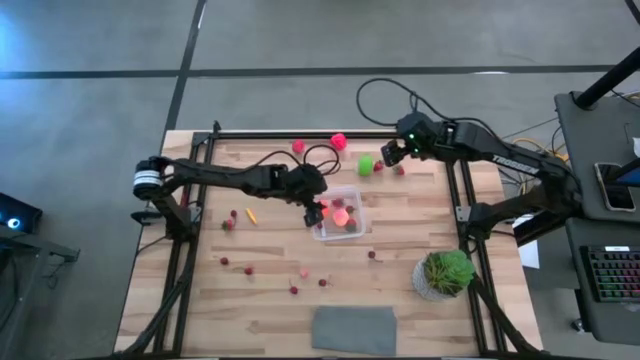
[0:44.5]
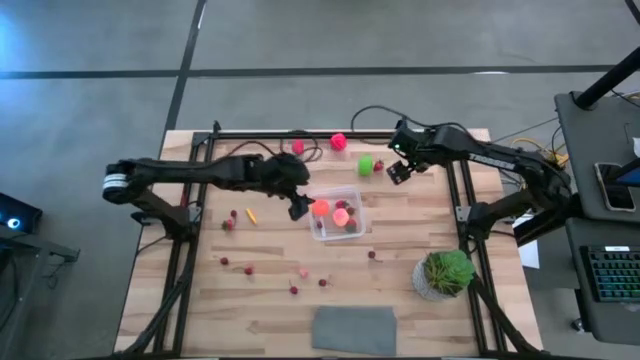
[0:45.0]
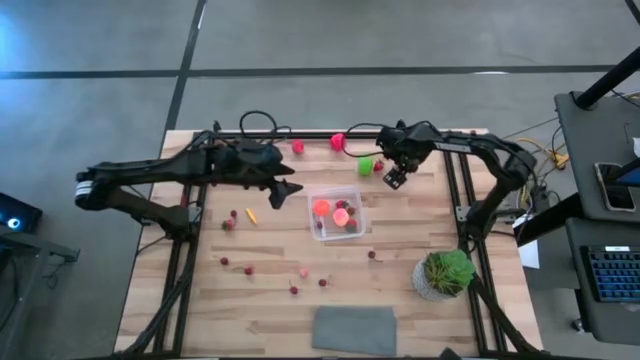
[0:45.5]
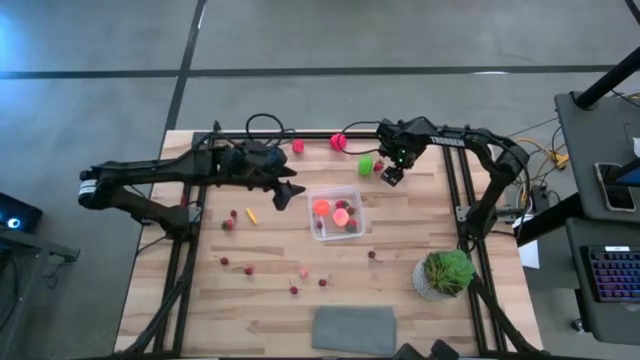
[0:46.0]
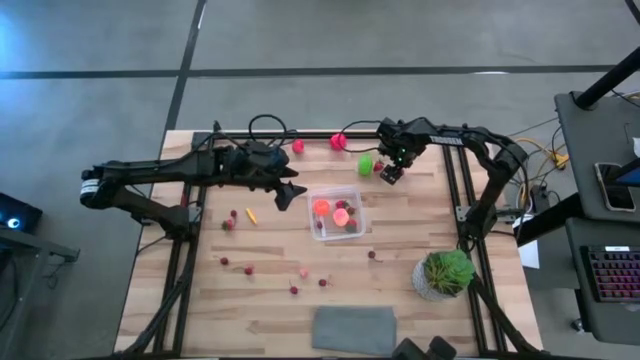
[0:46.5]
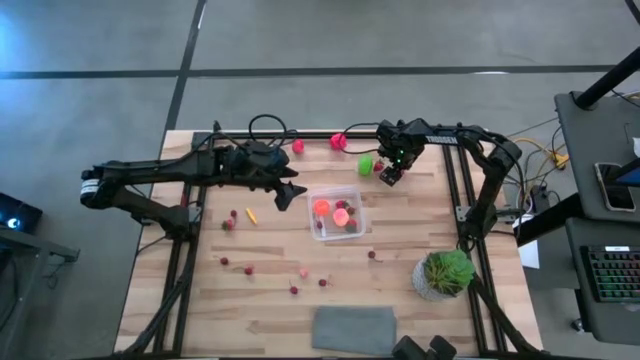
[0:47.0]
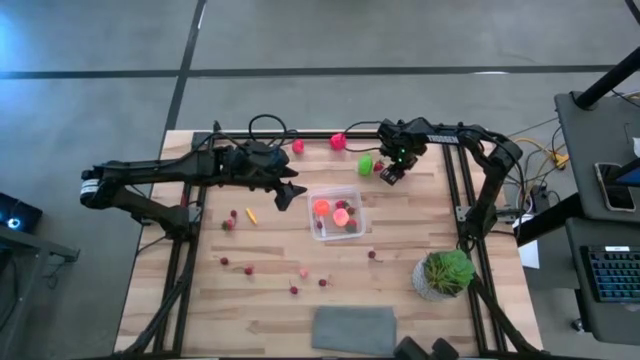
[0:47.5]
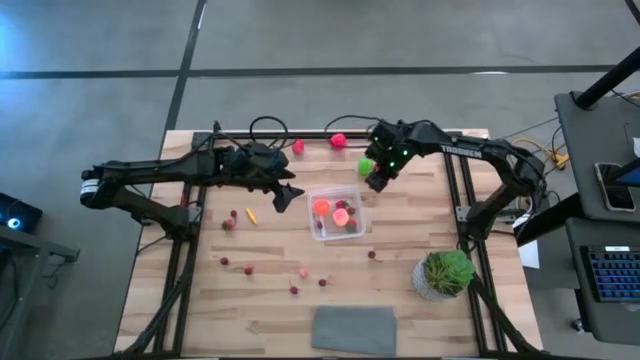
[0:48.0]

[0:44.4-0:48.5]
Task: Pick and placing Produce into tupperware
Put the red strawberry into the transparent container

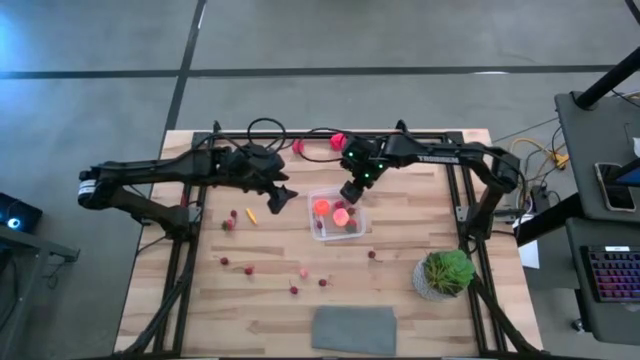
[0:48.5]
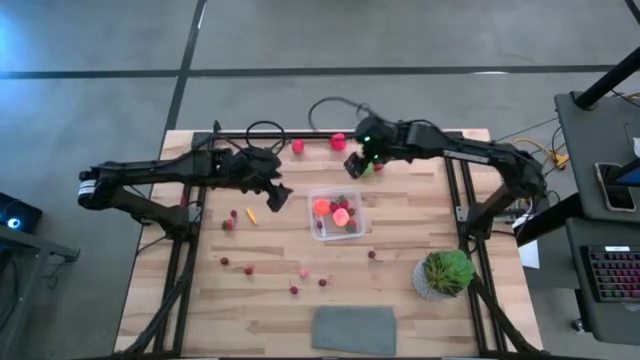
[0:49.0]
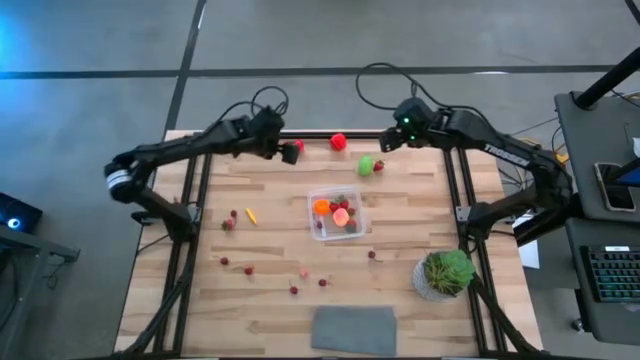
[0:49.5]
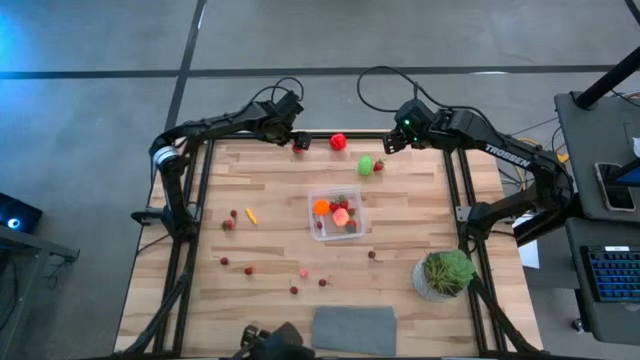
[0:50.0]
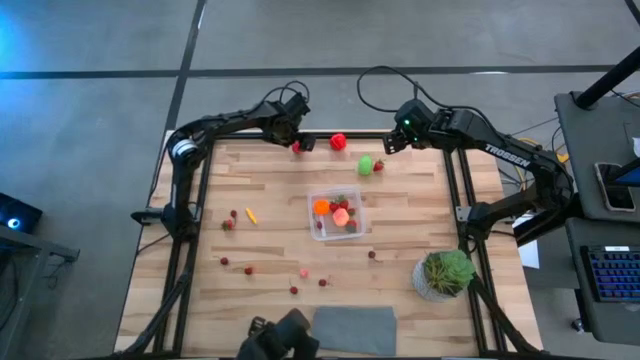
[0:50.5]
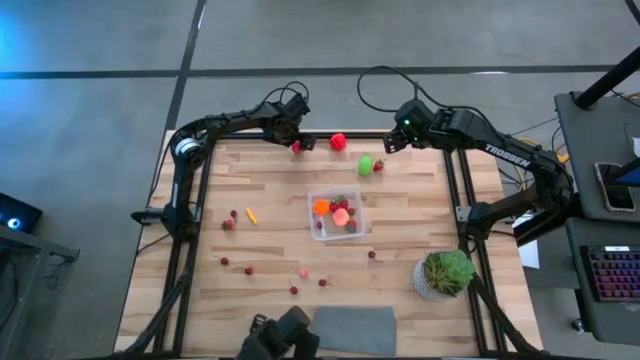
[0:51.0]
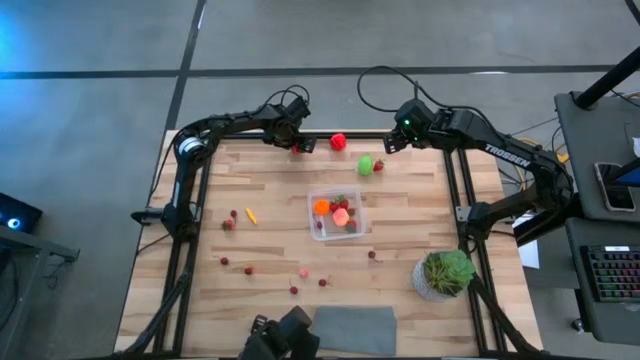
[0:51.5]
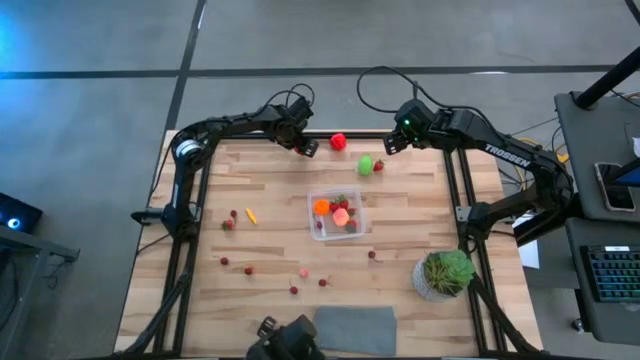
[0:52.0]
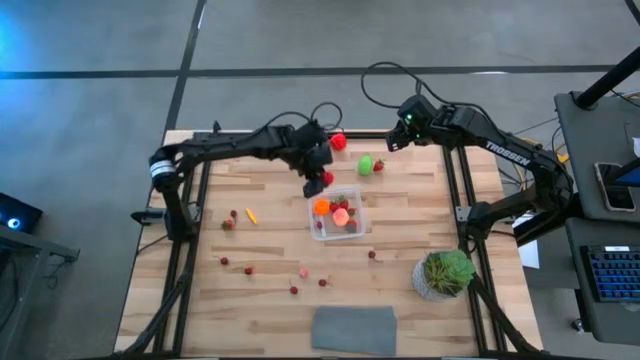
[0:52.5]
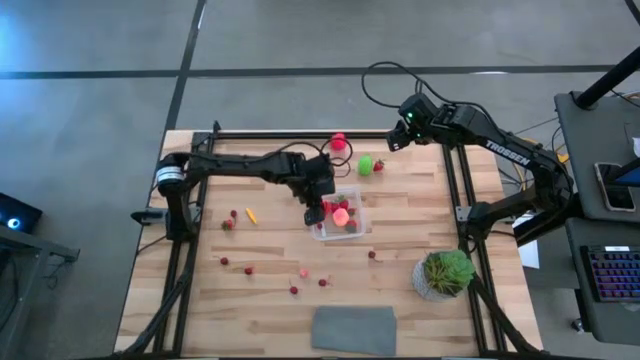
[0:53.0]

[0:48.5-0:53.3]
Put the red strawberry into the transparent container

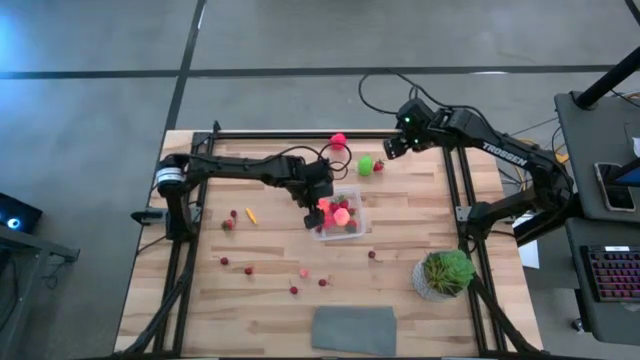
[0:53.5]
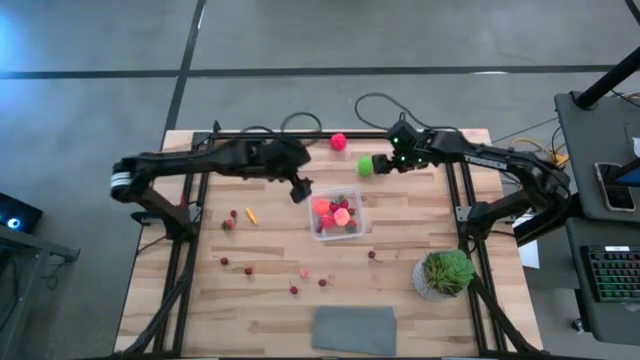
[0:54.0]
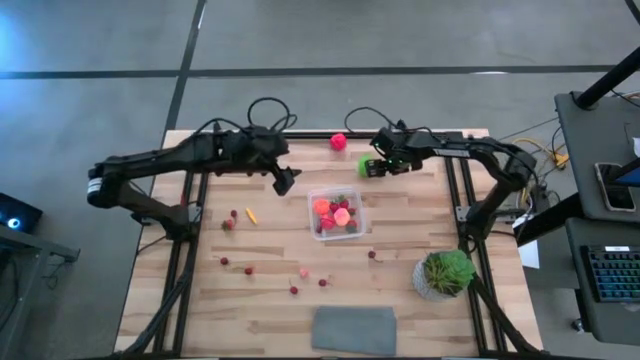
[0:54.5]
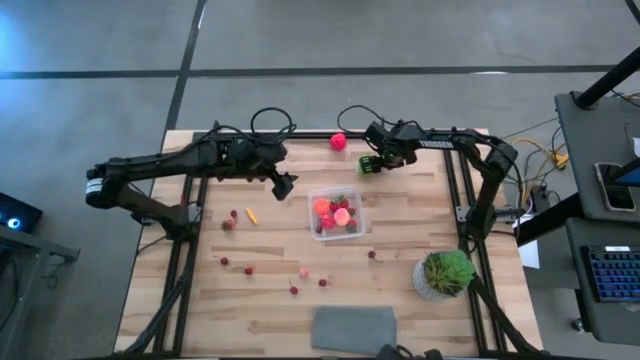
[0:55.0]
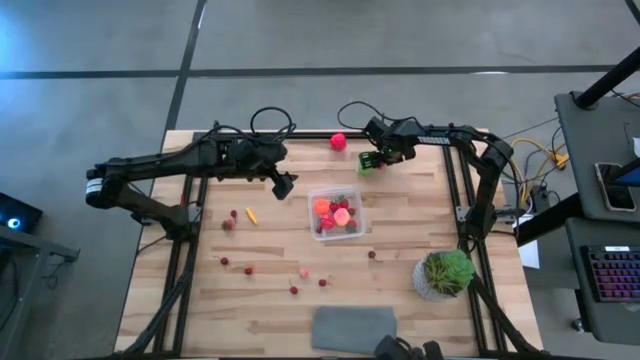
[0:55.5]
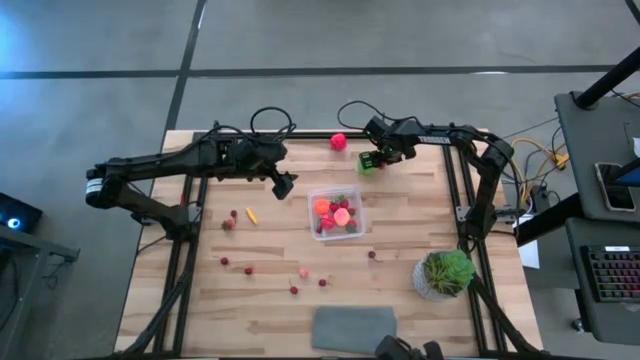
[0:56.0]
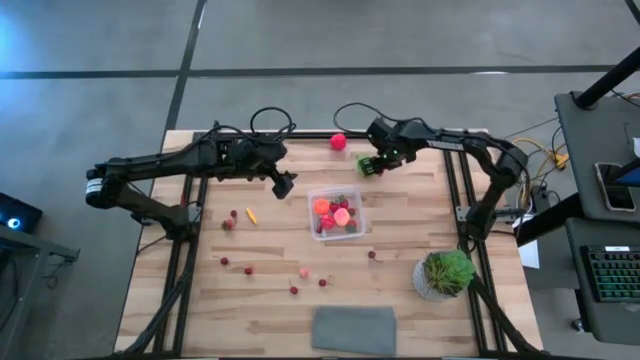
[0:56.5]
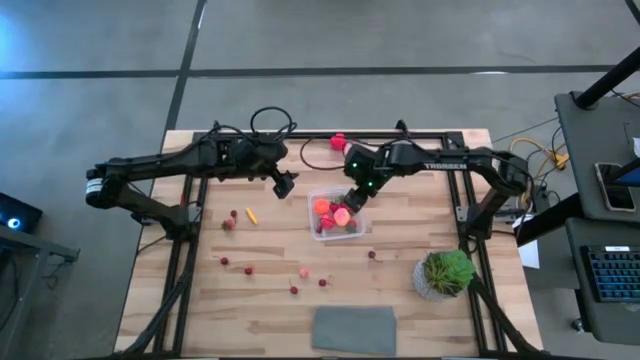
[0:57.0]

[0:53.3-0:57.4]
Put the red strawberry into the transparent container

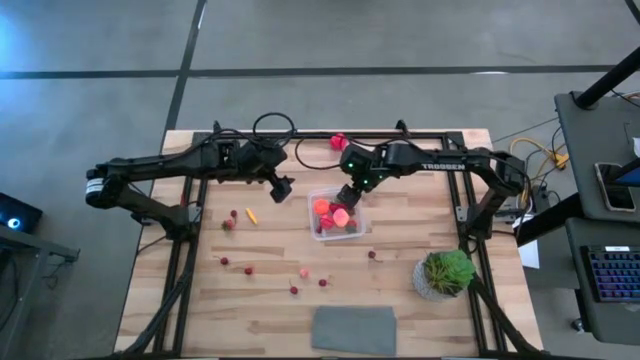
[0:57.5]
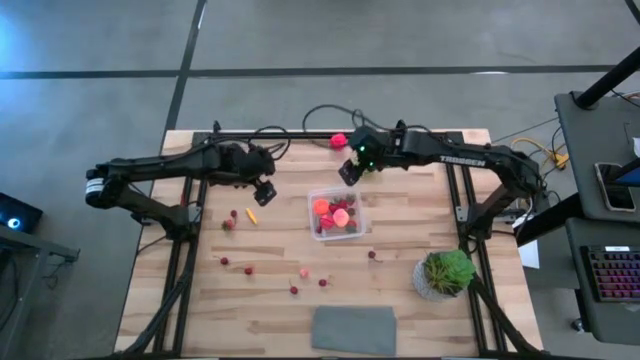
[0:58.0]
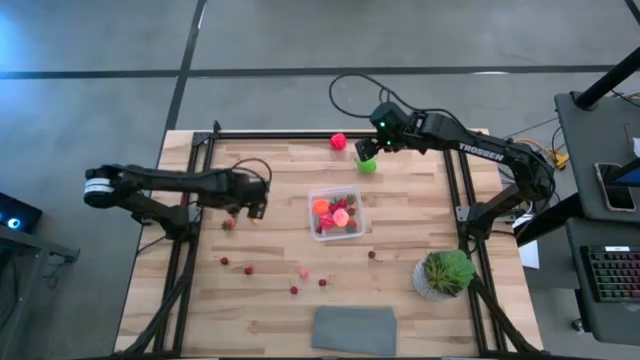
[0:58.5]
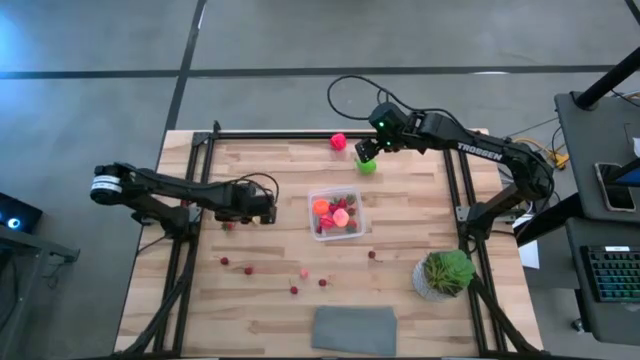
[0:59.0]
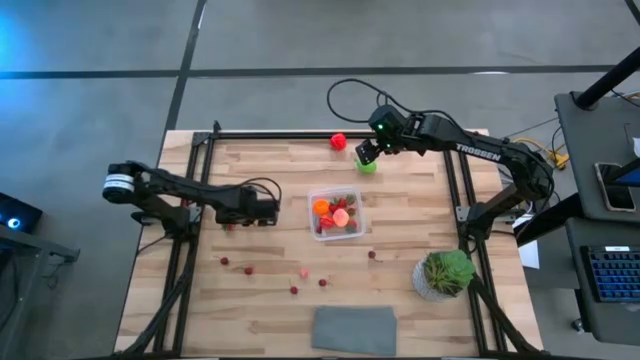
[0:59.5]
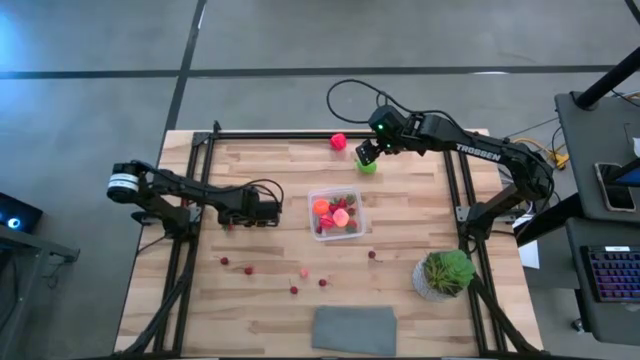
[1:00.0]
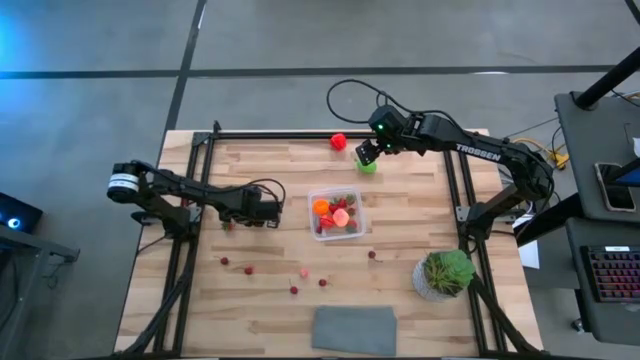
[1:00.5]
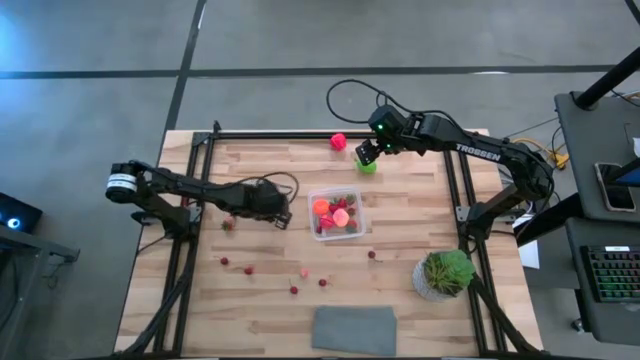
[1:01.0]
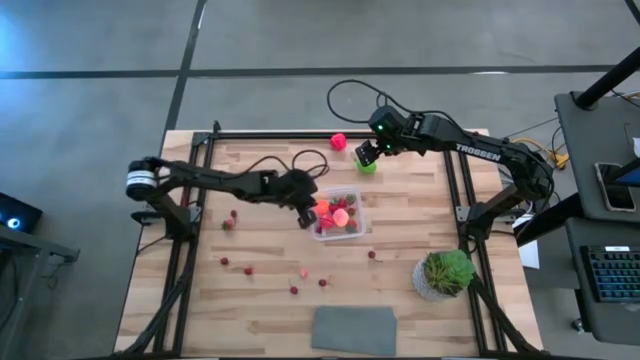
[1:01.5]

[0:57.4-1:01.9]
Put the yellow corn into the transparent container

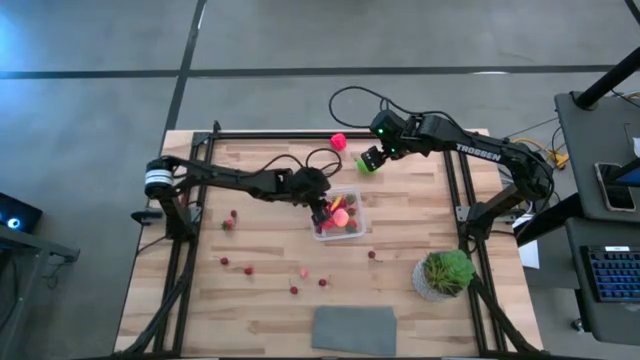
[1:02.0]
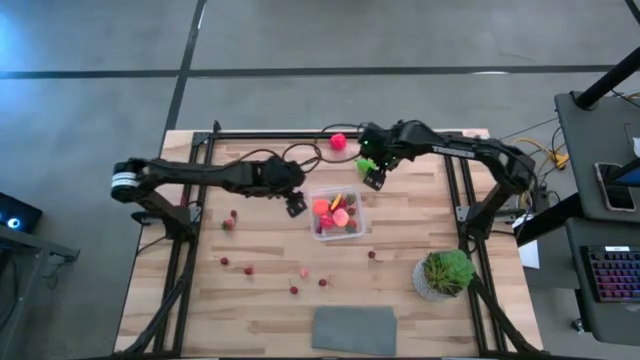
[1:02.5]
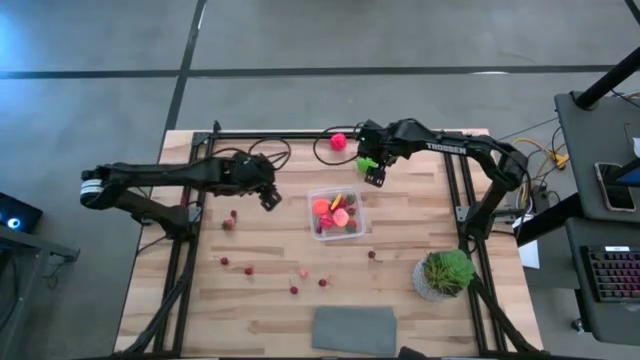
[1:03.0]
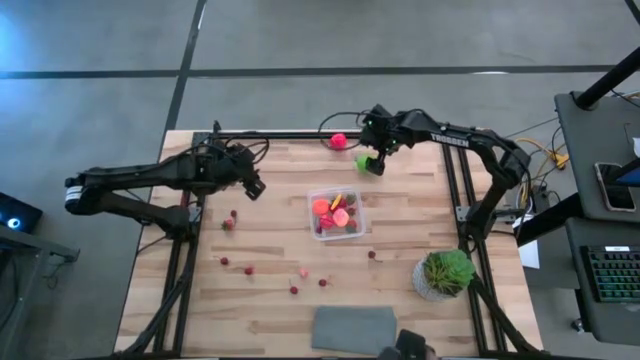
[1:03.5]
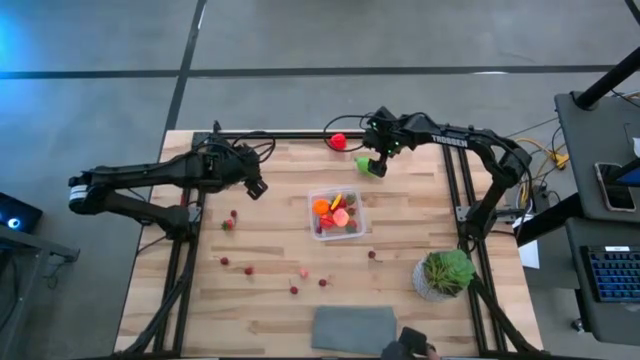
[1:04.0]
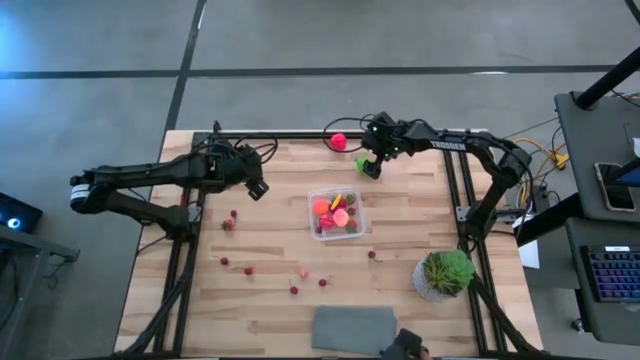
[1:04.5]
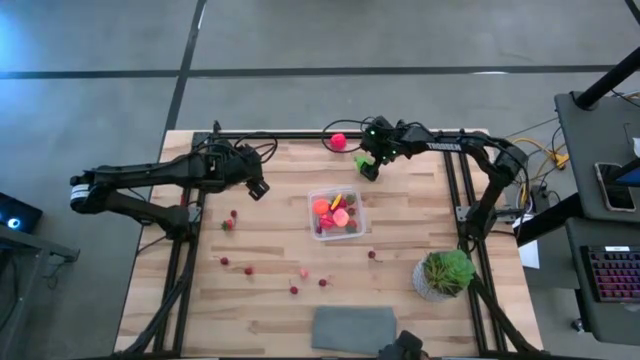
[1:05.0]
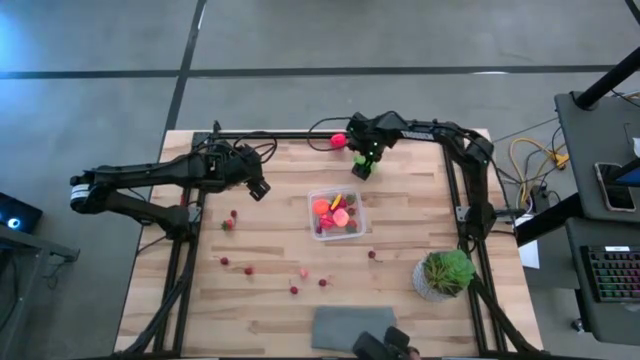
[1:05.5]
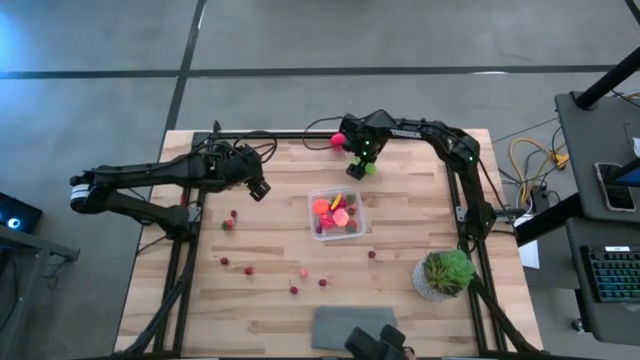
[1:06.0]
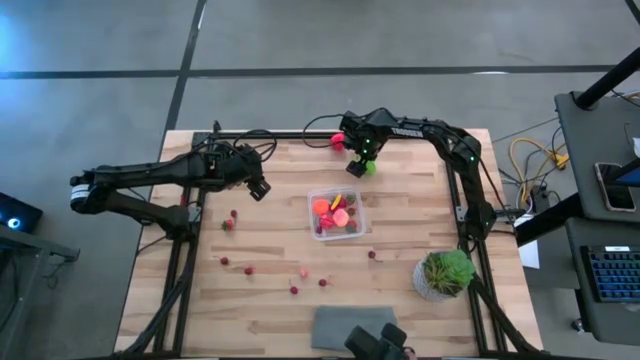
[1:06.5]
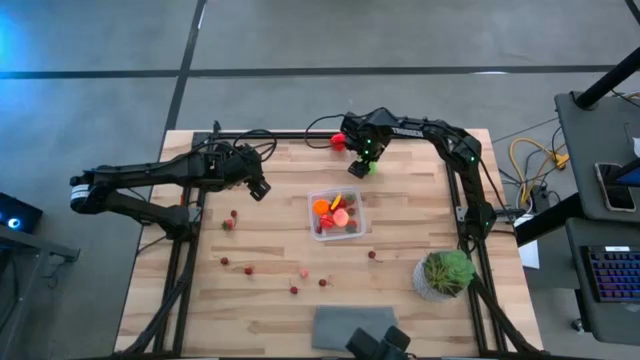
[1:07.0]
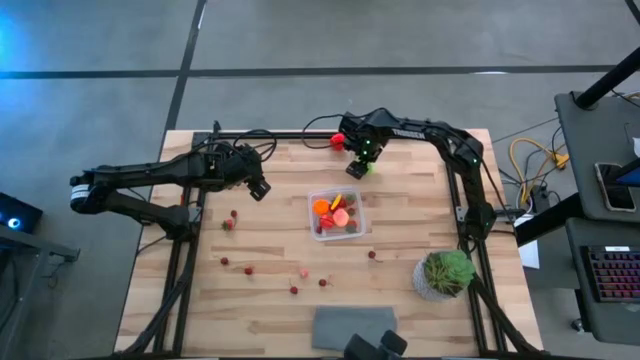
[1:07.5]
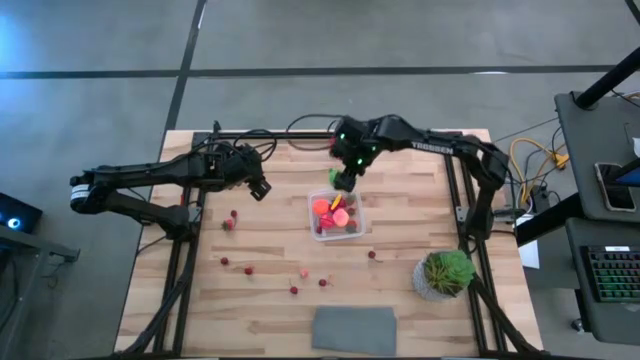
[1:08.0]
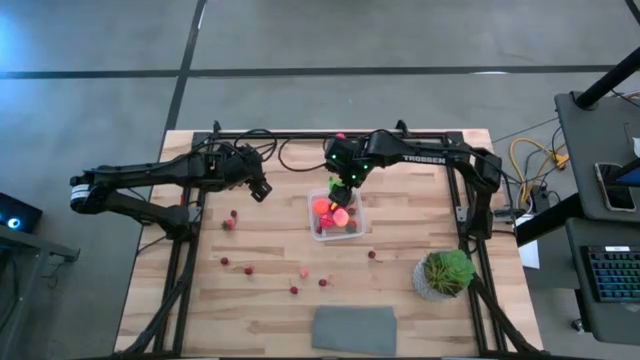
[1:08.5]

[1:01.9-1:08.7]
Put the green melon into the transparent container
